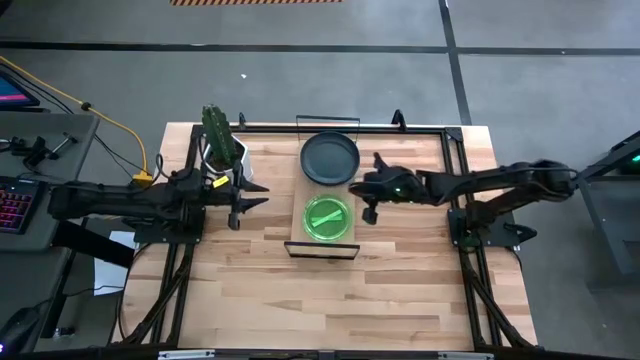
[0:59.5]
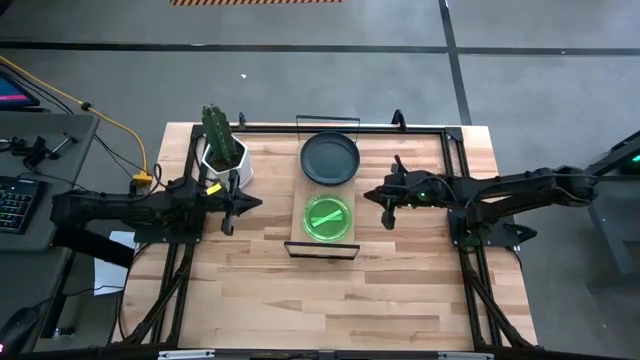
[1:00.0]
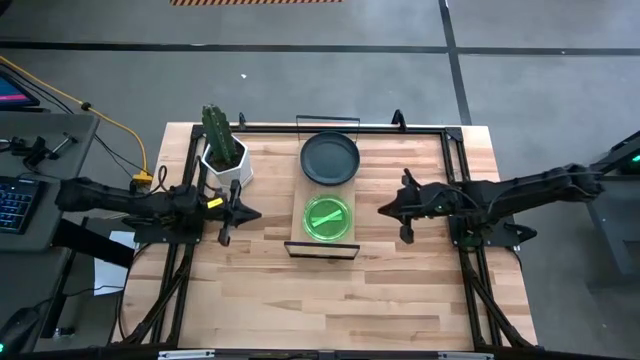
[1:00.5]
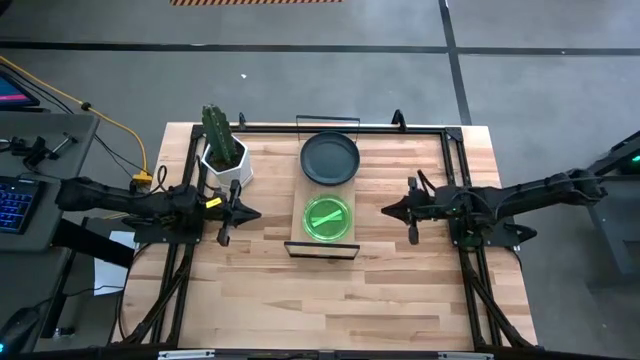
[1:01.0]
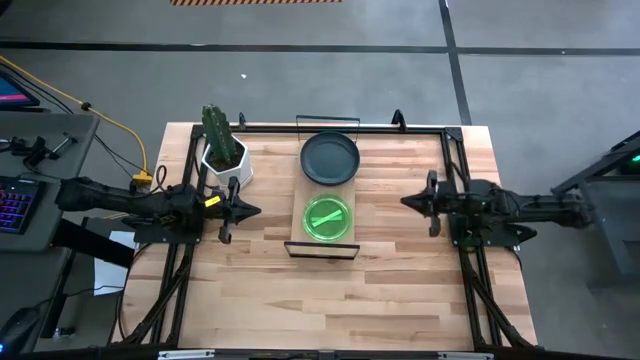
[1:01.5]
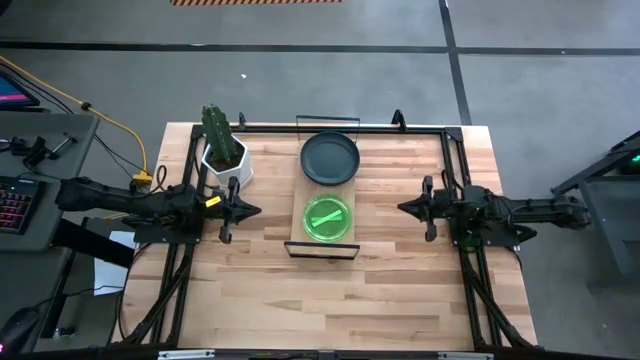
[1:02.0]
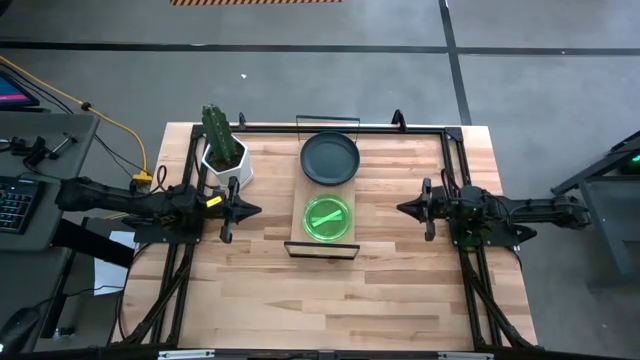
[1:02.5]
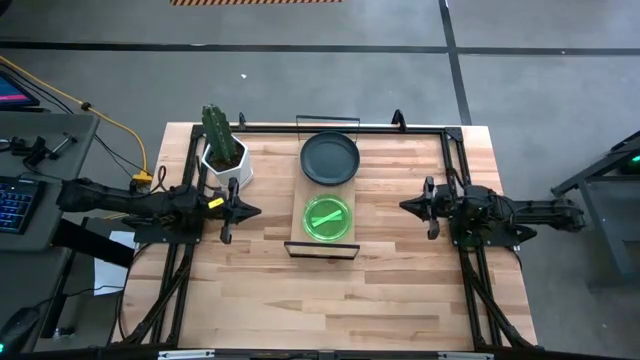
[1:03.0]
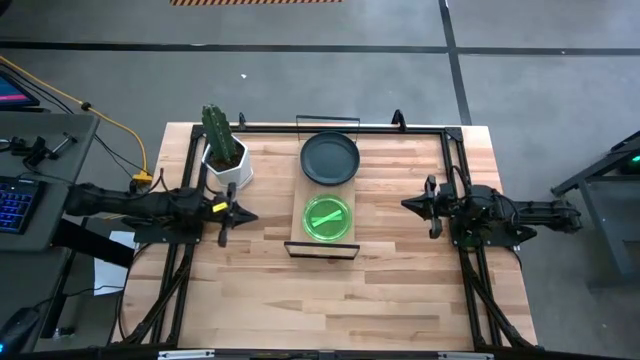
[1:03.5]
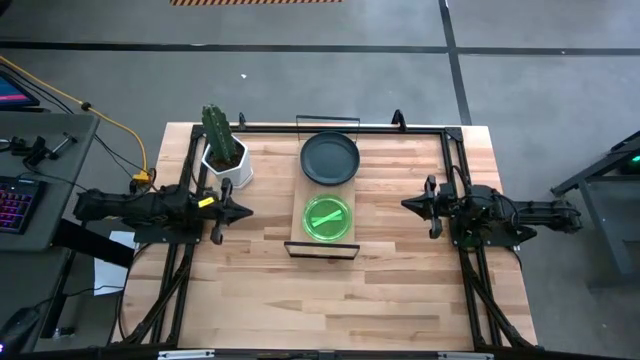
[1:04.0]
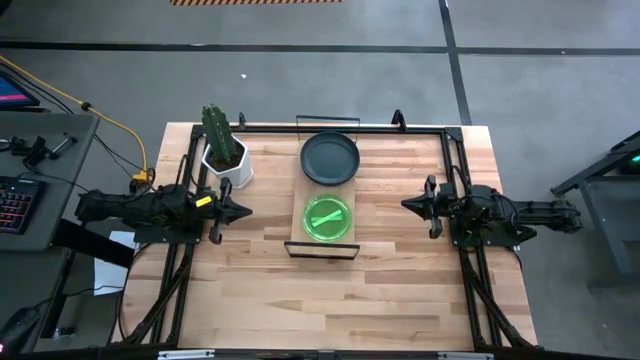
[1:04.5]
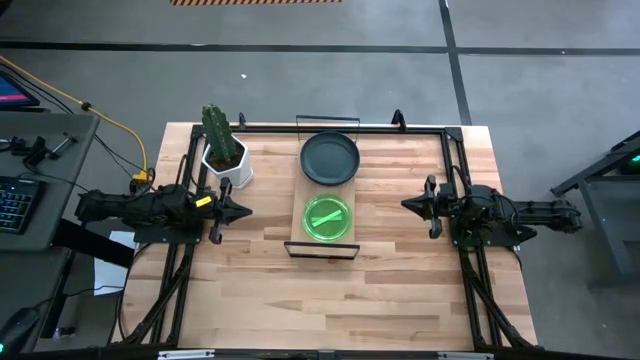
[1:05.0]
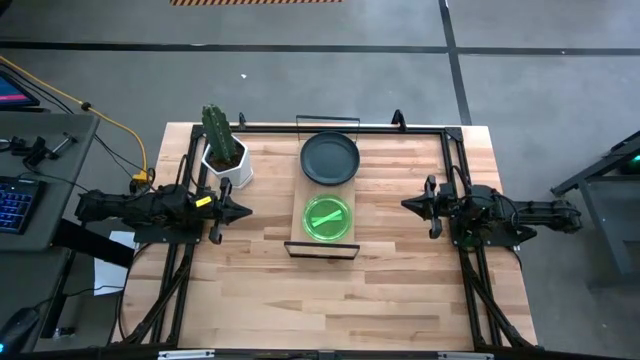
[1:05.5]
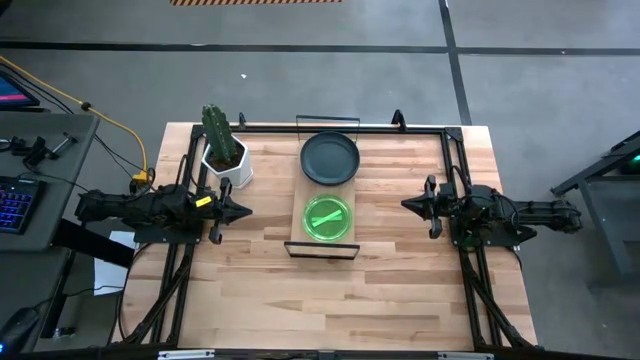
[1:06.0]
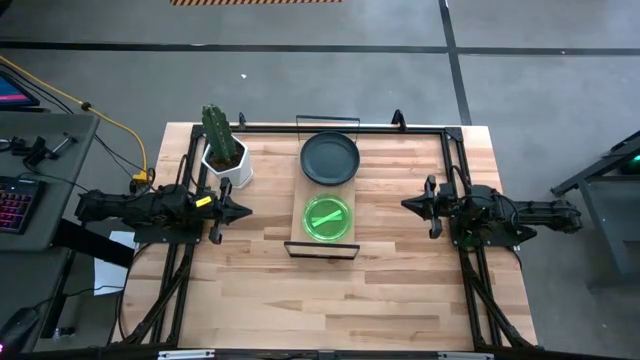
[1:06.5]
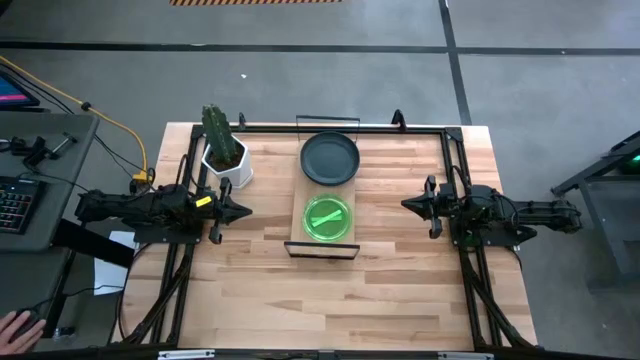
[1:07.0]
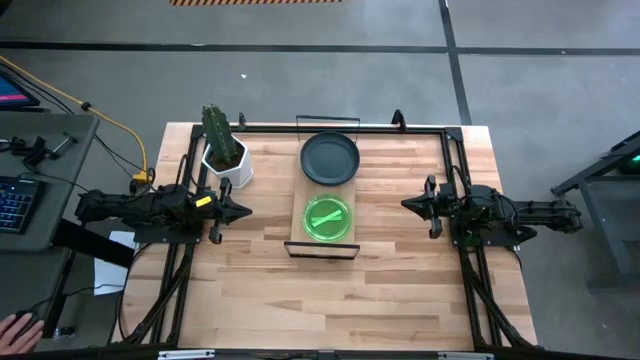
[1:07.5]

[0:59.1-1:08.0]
Task: Place and stack plates onto a shelf
Return to Home Position

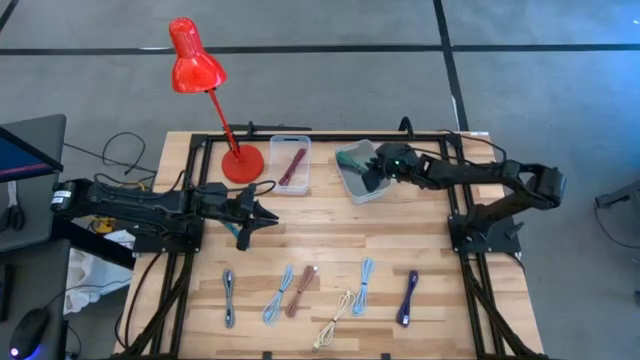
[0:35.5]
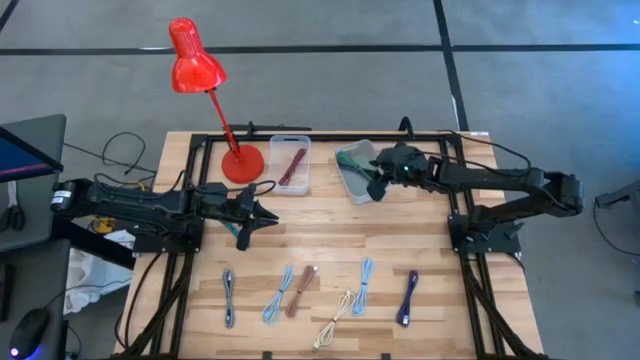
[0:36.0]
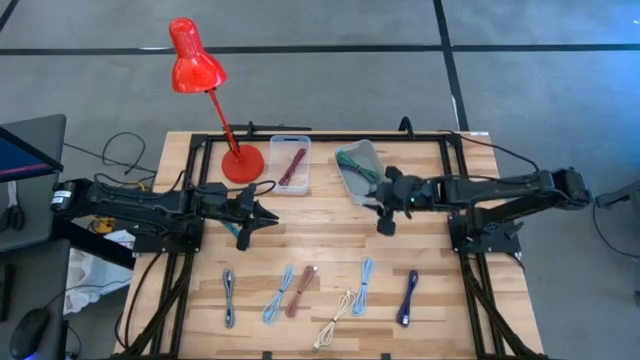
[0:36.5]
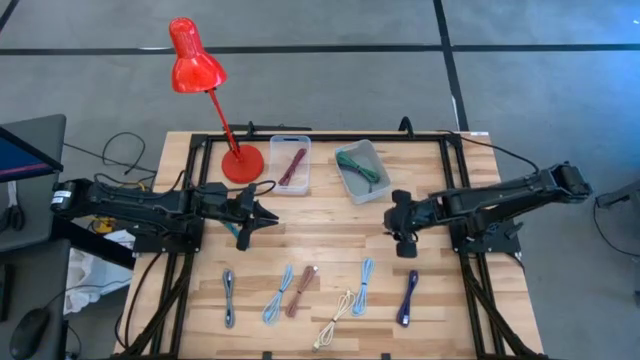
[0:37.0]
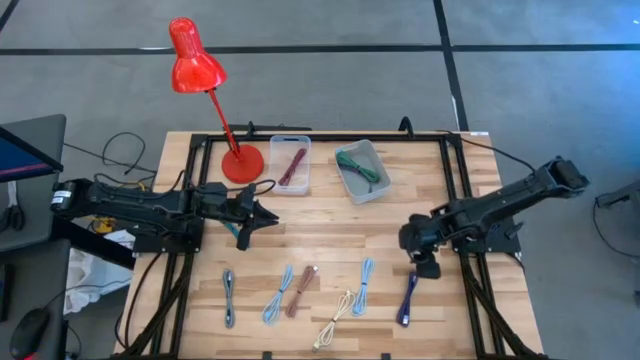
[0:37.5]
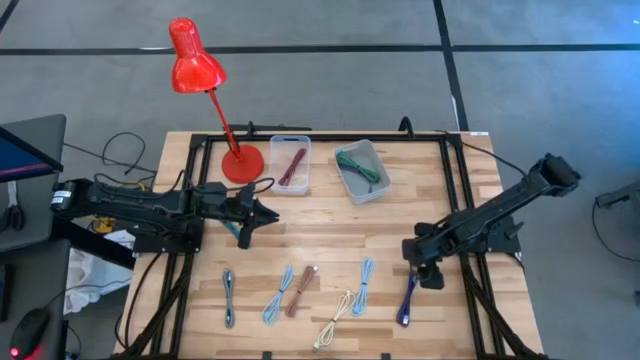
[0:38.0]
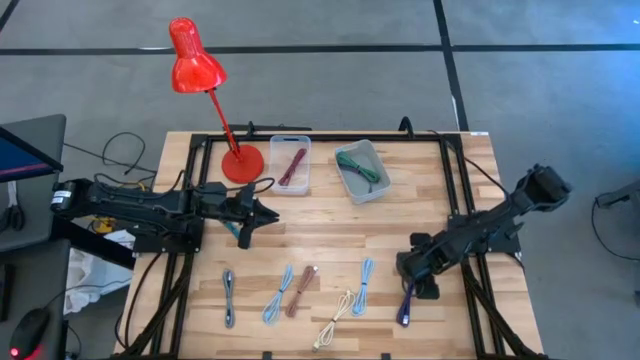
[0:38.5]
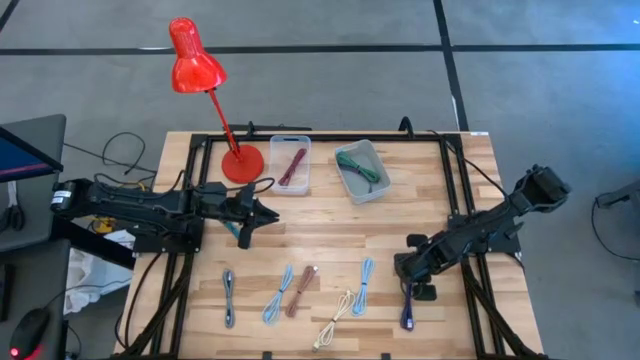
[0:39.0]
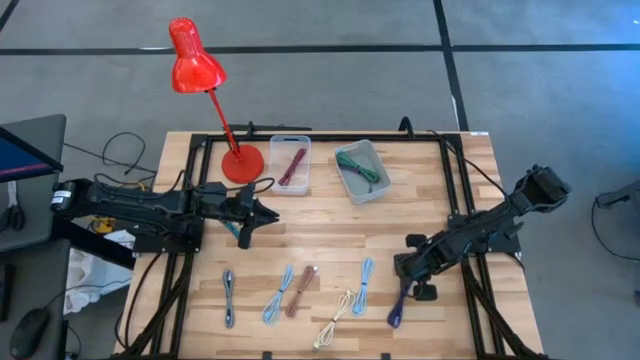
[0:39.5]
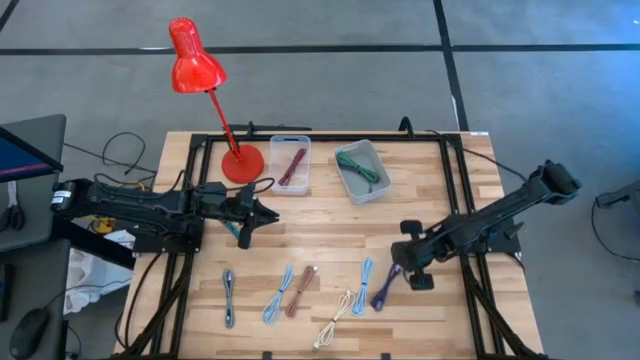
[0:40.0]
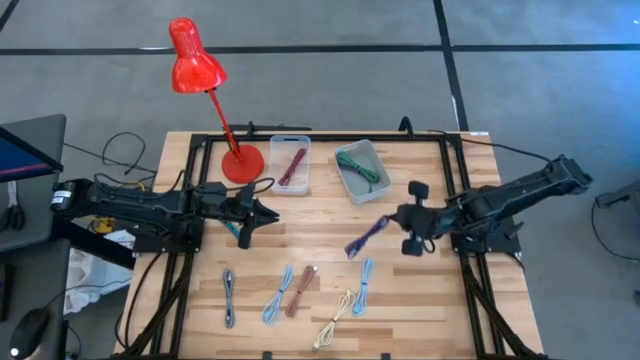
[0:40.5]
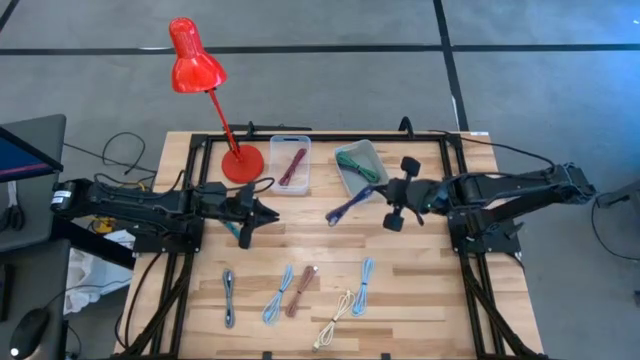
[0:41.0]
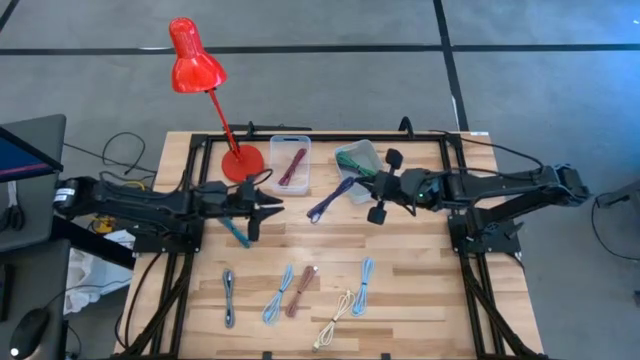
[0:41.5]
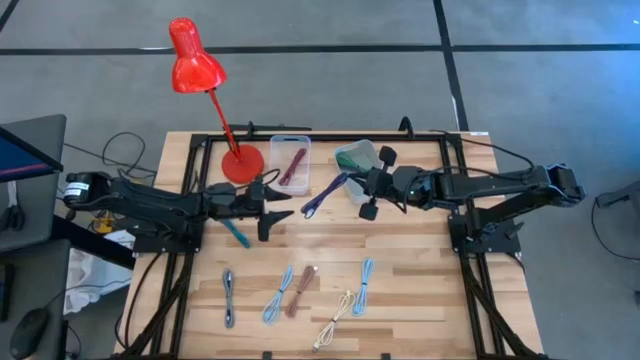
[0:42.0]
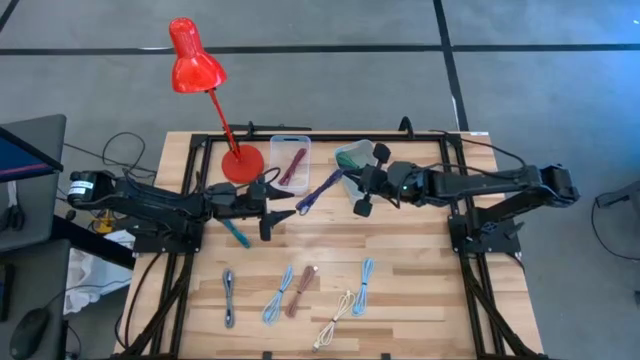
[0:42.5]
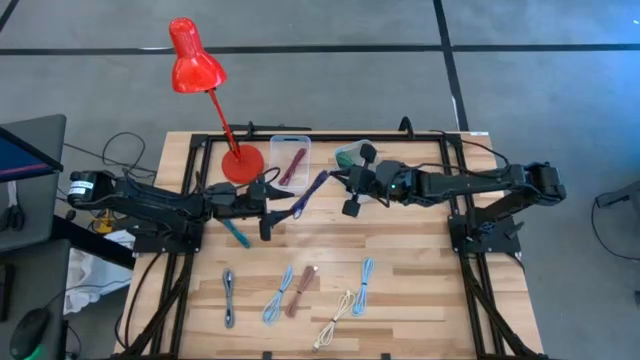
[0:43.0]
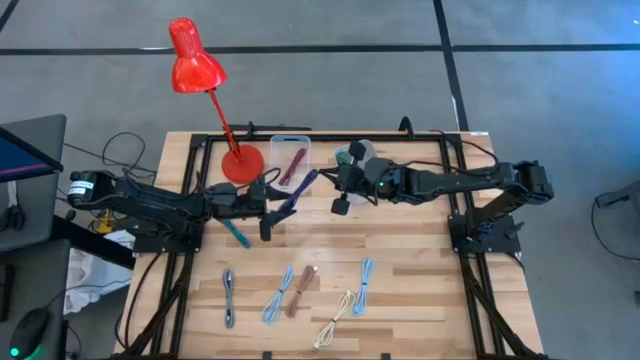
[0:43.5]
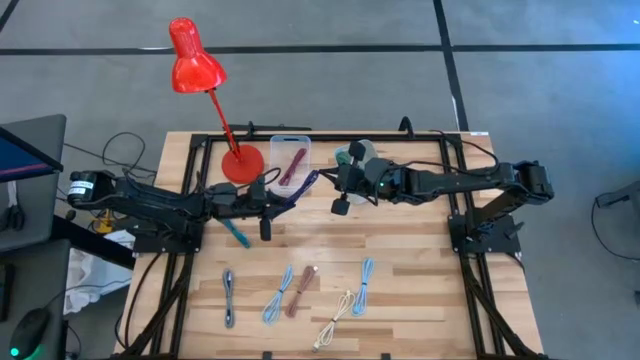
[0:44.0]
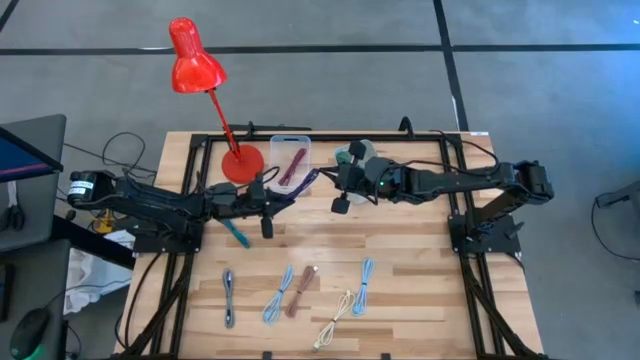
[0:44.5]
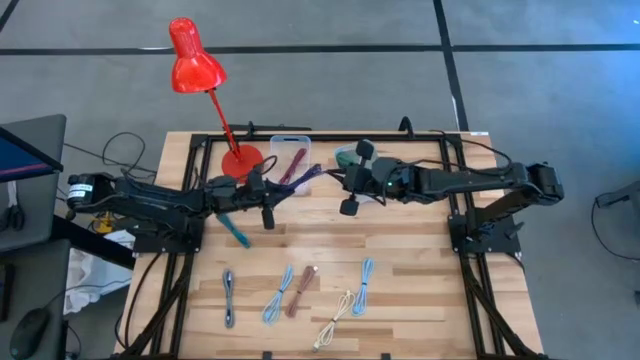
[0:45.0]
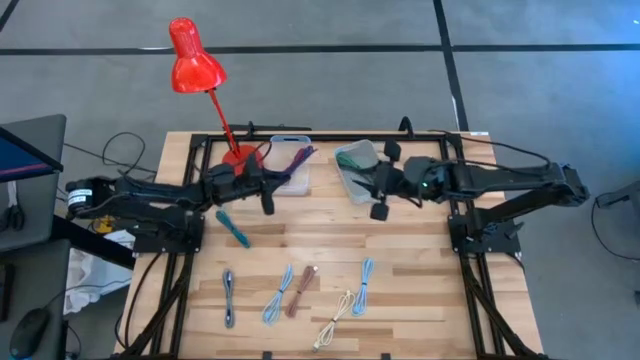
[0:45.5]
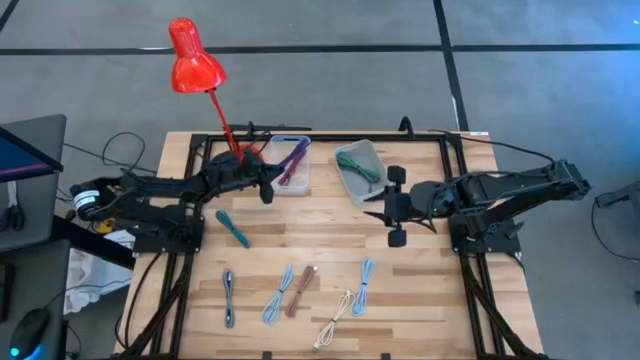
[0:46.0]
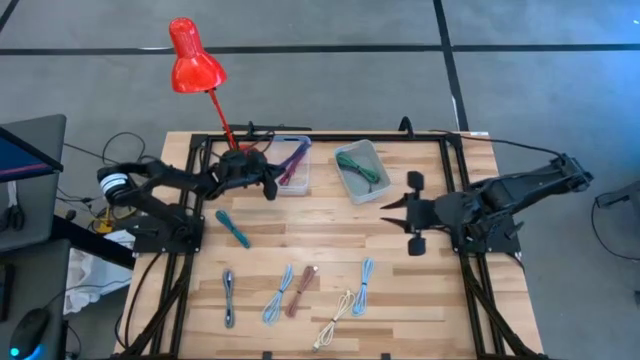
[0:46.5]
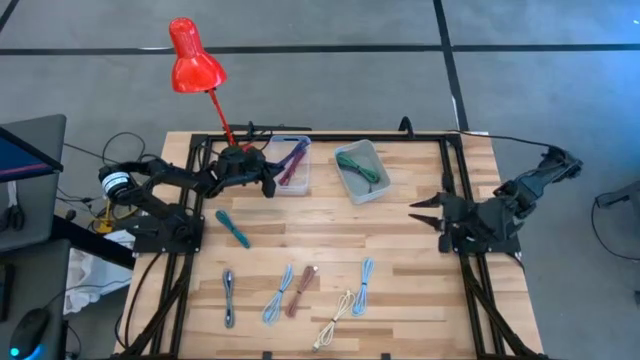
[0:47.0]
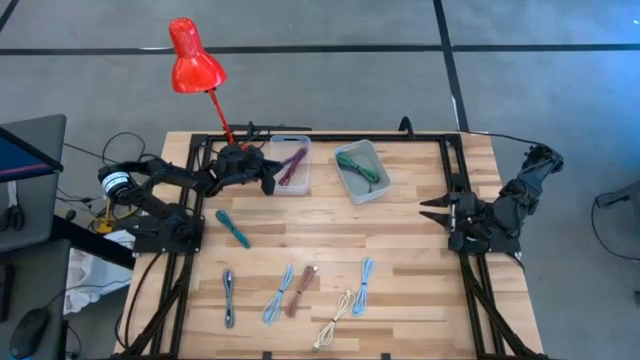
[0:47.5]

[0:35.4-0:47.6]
Task: Pick & Place USB Port
Put the dark blue USB cable into the transparent bin
